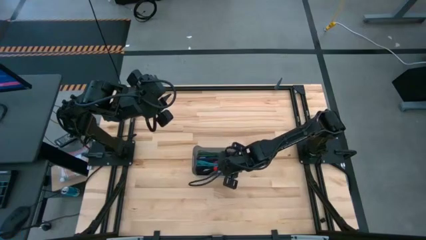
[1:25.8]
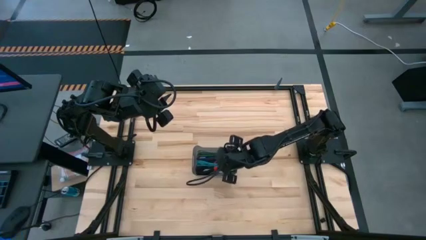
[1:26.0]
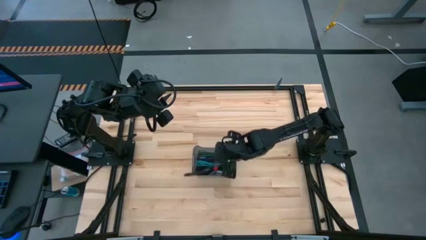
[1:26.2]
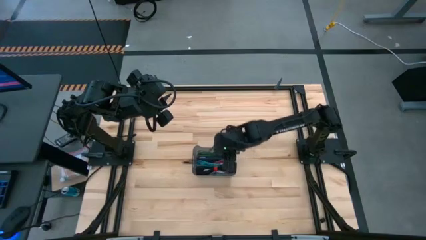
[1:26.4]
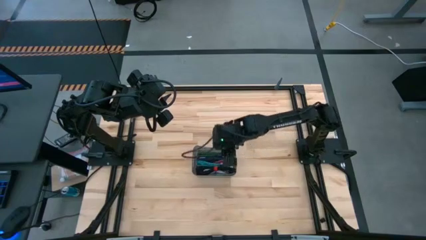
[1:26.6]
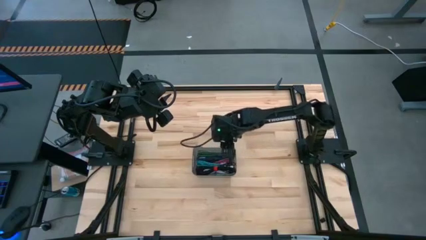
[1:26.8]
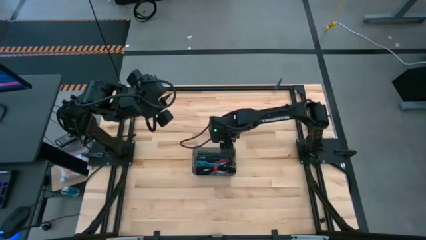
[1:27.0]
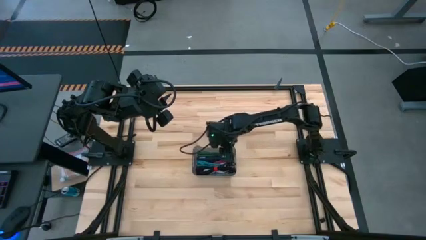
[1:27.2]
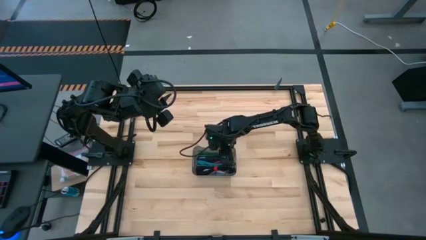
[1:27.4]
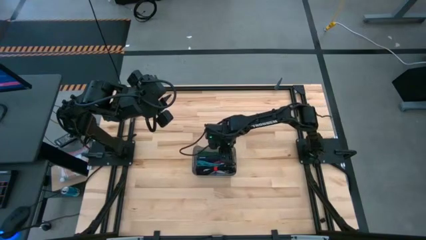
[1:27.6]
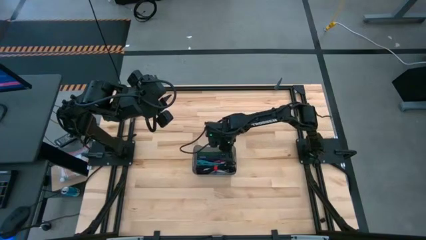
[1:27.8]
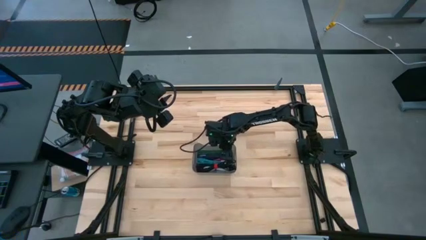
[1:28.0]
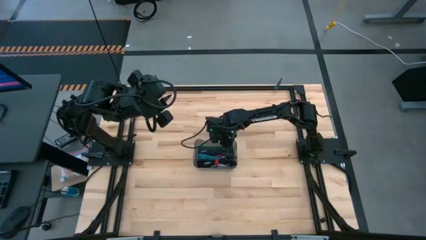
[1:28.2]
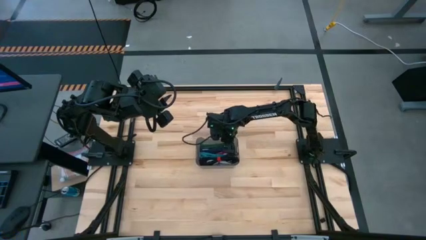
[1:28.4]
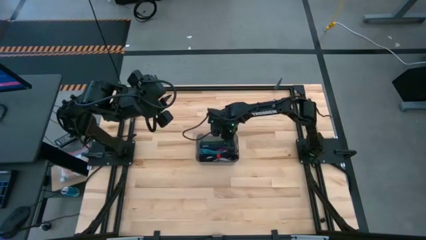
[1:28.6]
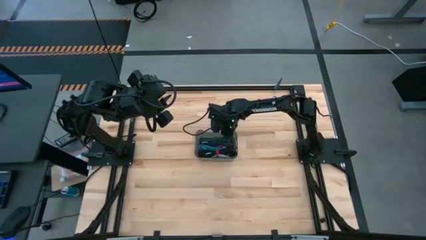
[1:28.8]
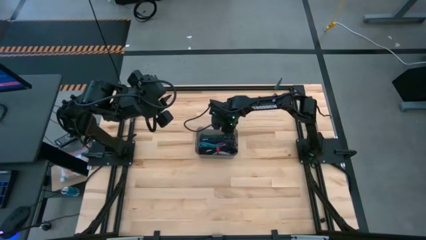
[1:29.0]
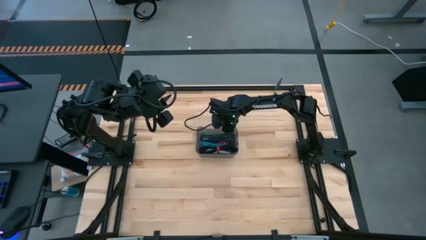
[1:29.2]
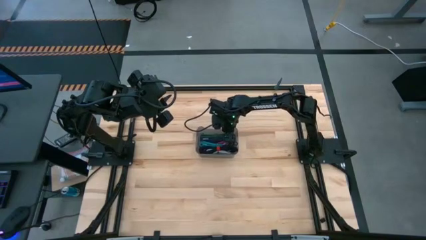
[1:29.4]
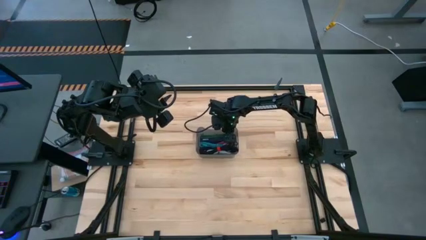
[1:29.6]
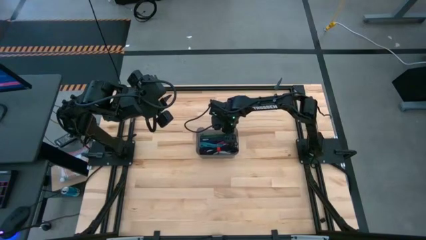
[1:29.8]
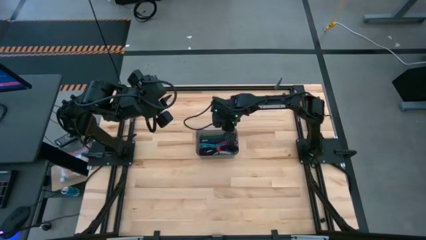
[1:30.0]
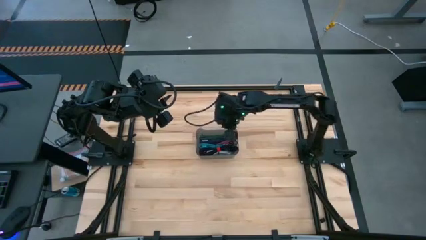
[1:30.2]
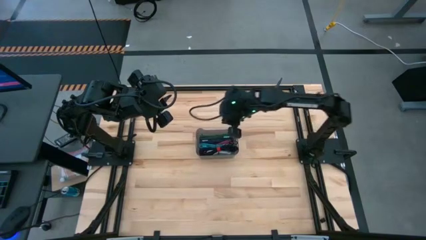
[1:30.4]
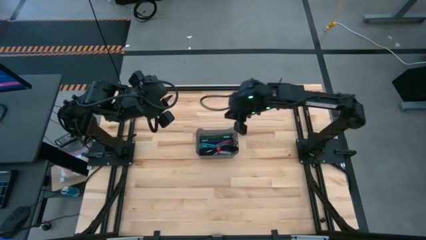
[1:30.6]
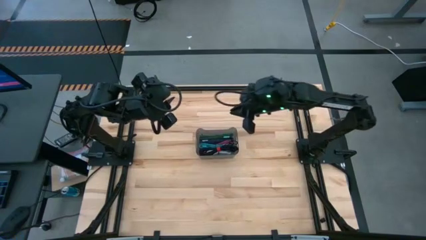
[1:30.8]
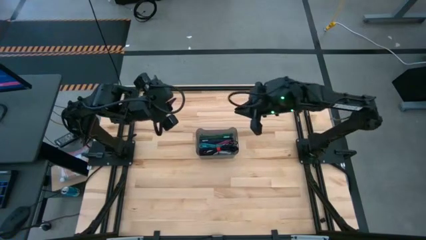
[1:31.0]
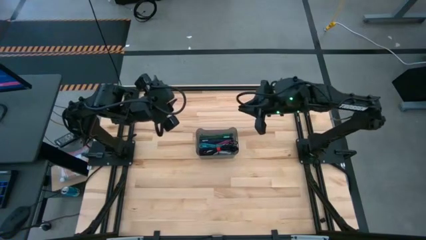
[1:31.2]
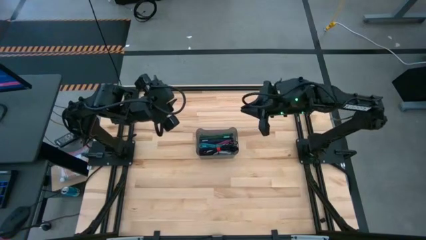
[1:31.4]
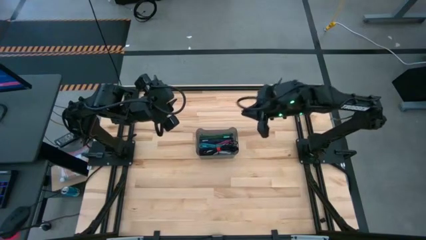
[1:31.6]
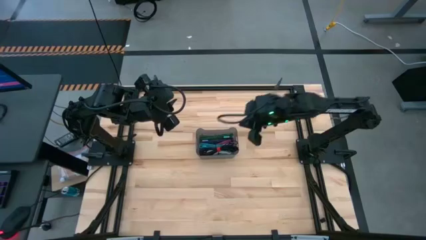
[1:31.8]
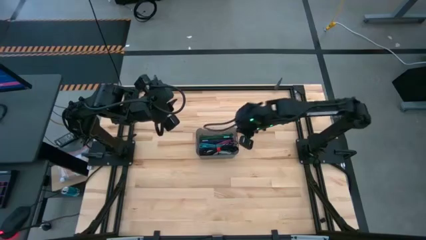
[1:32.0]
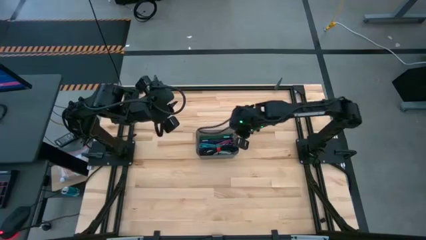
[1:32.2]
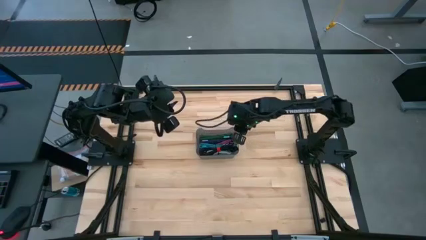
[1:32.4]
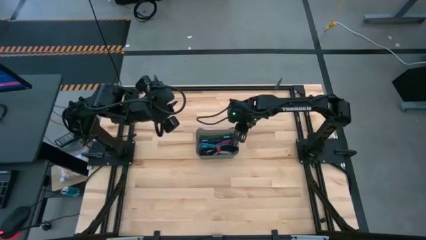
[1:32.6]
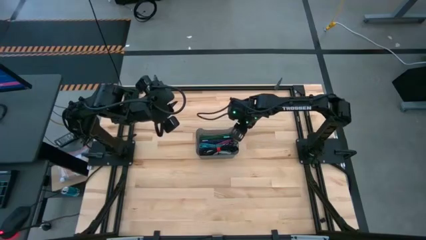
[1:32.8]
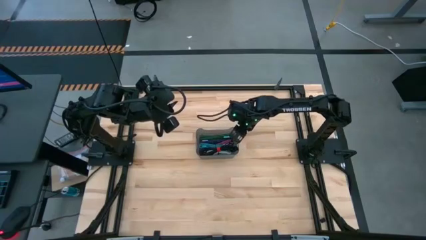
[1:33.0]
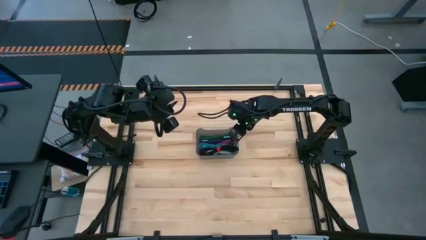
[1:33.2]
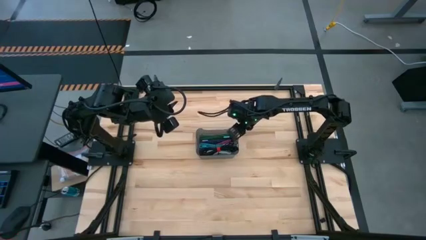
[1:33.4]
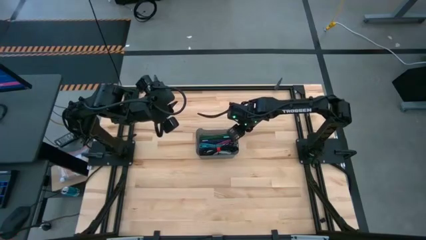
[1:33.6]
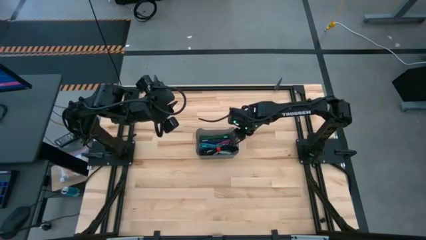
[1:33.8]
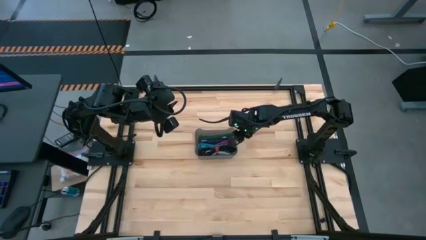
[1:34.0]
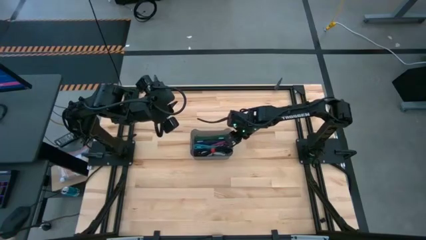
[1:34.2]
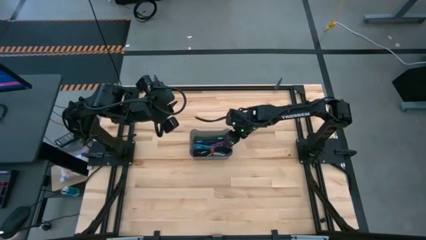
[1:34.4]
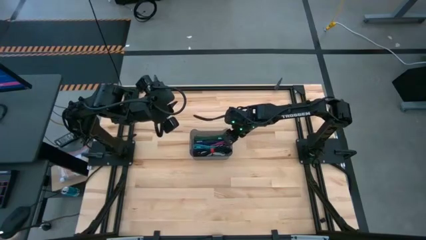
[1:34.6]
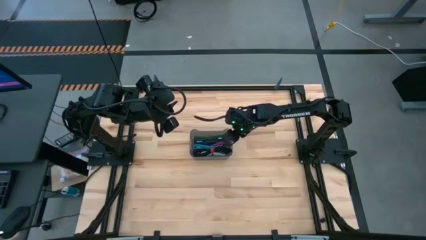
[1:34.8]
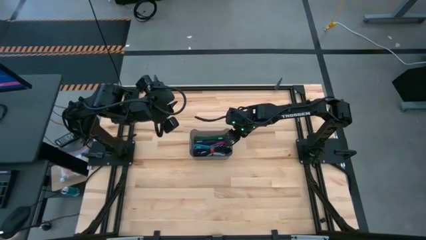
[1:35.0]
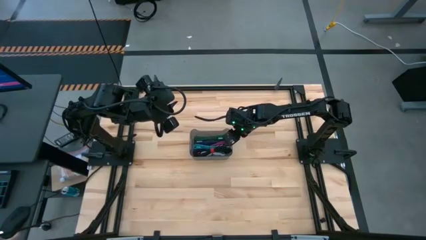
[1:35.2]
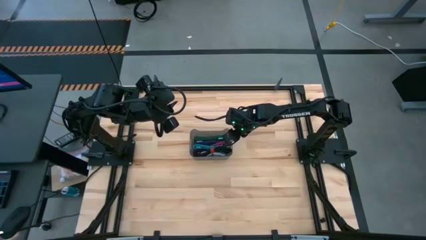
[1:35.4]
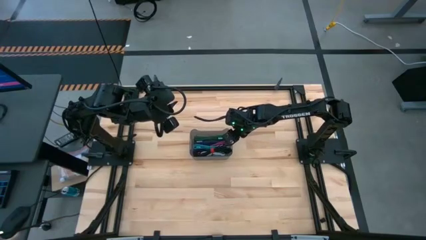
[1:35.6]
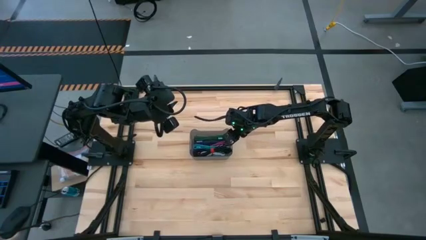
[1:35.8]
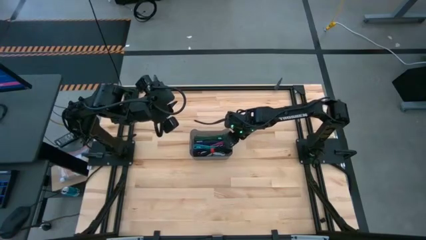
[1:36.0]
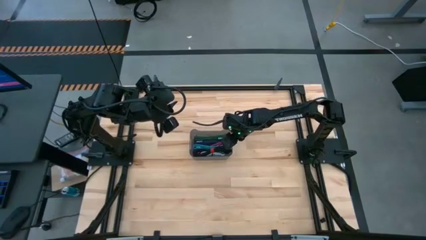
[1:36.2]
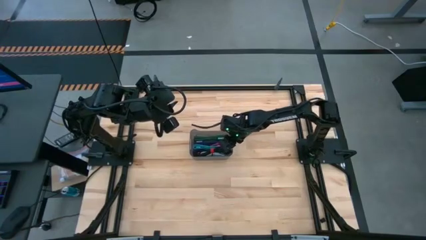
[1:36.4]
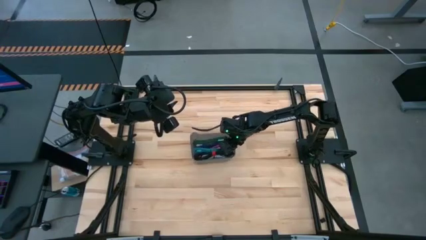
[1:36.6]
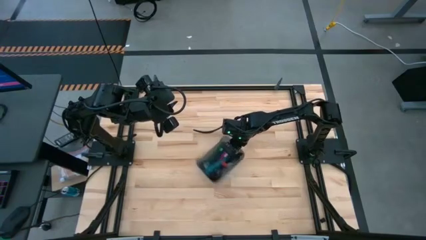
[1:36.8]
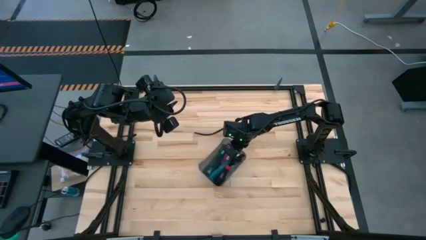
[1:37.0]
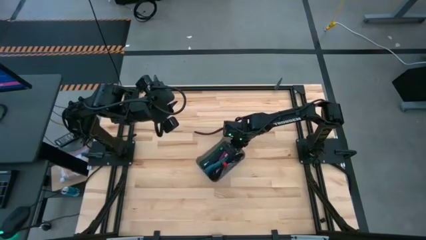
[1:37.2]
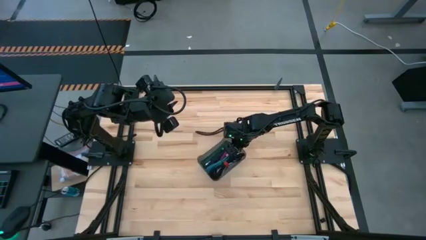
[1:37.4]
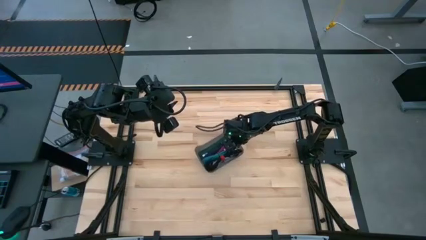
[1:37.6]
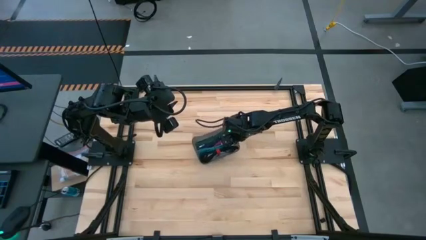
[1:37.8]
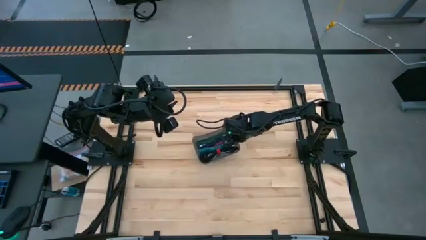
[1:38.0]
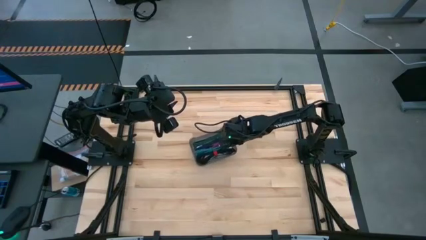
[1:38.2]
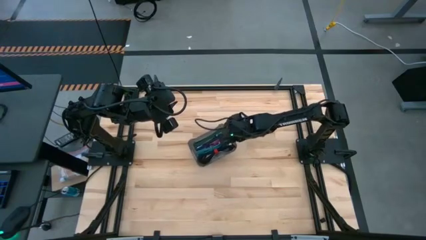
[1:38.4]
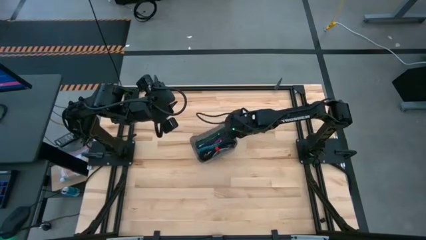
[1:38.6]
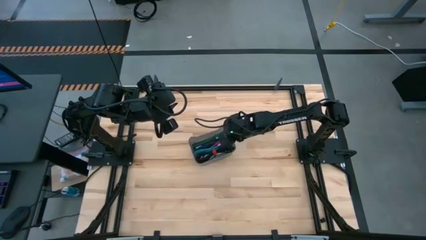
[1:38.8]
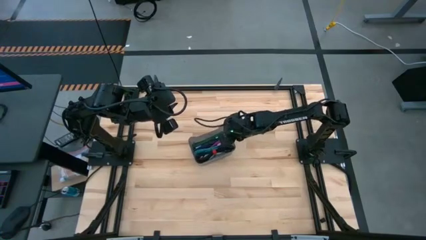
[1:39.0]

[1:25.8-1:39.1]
Task: Pick and place USB-C Cables
Adjust the black bin

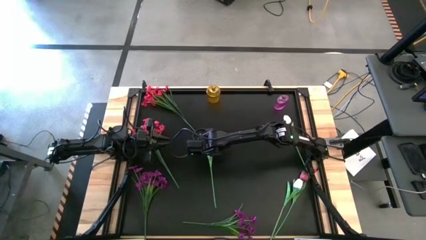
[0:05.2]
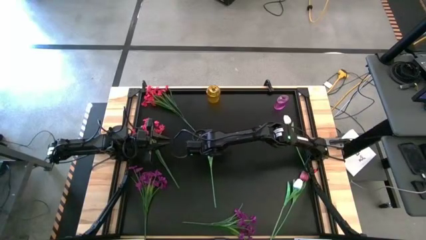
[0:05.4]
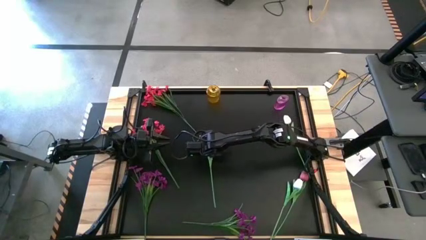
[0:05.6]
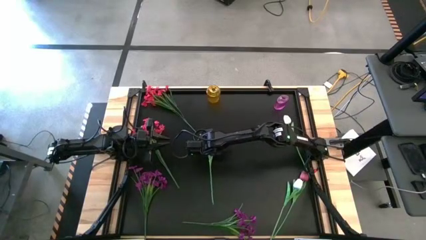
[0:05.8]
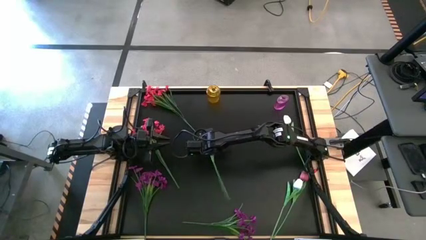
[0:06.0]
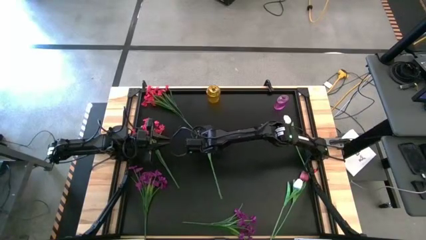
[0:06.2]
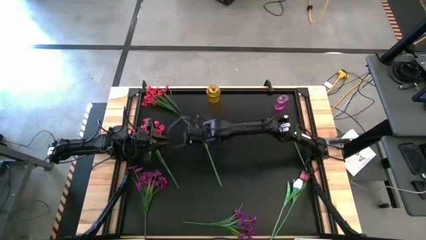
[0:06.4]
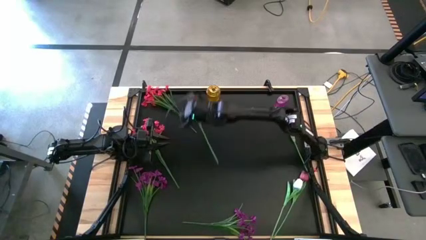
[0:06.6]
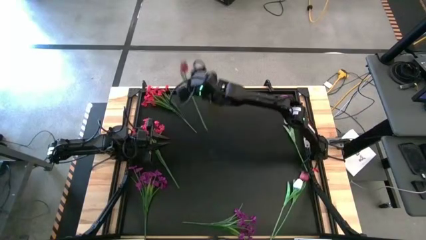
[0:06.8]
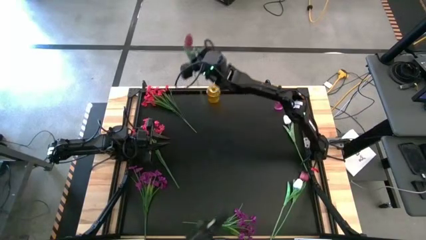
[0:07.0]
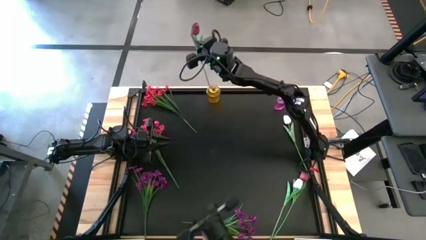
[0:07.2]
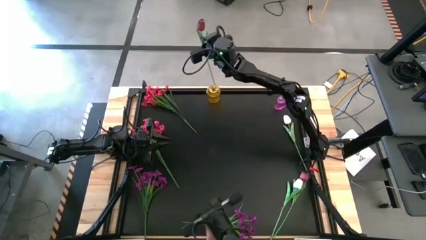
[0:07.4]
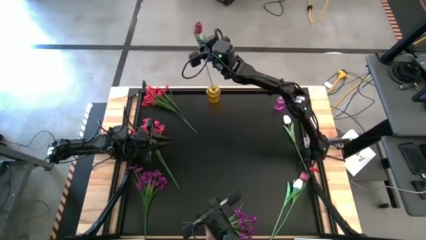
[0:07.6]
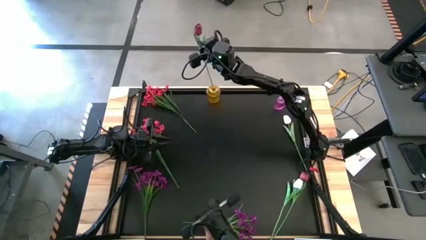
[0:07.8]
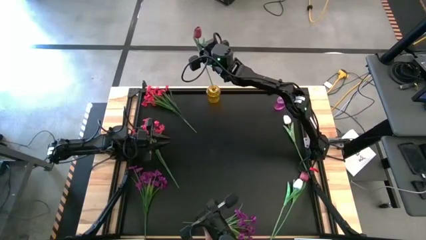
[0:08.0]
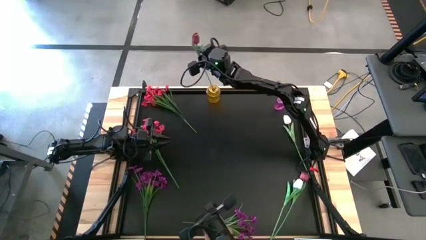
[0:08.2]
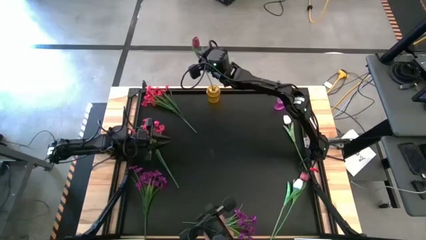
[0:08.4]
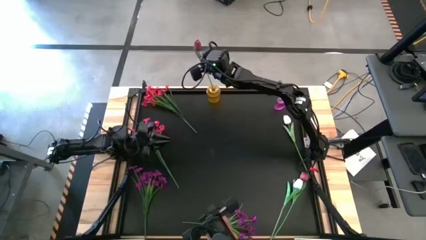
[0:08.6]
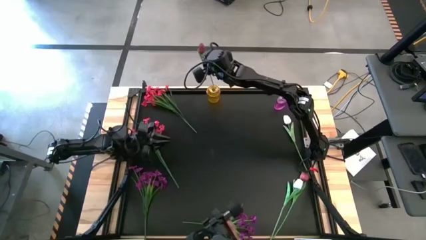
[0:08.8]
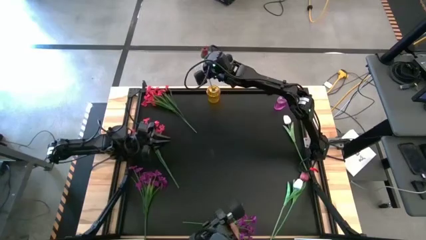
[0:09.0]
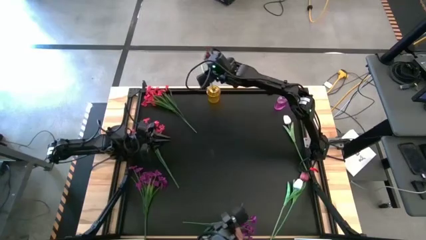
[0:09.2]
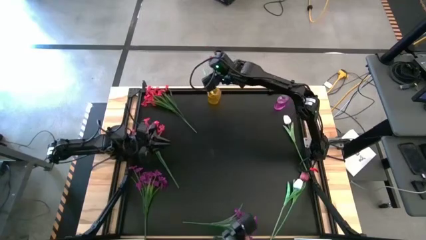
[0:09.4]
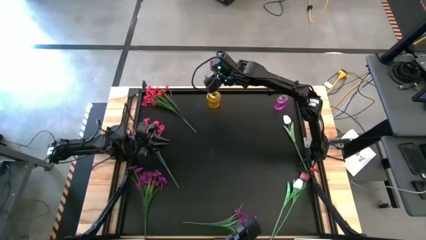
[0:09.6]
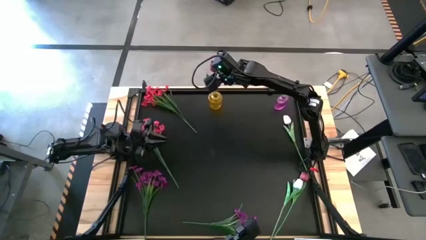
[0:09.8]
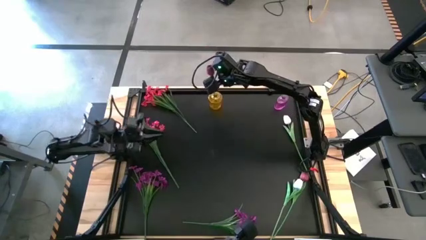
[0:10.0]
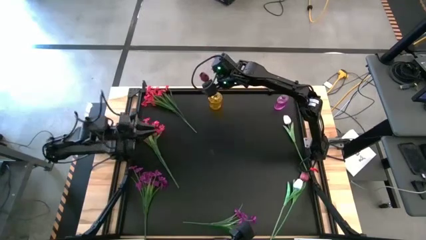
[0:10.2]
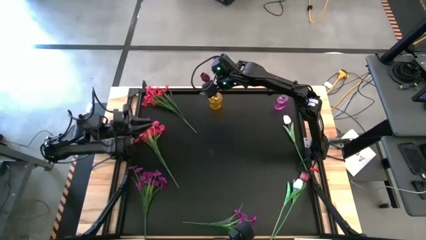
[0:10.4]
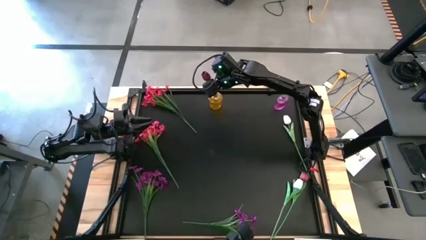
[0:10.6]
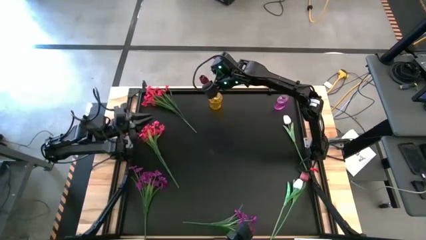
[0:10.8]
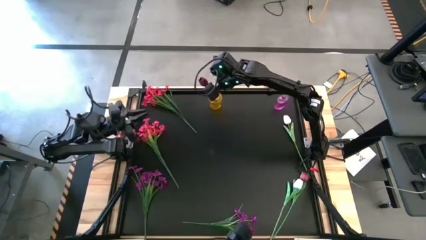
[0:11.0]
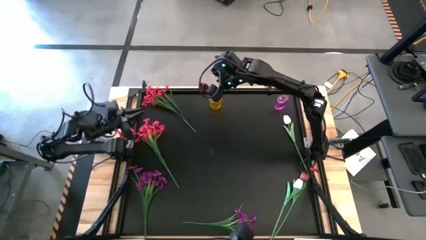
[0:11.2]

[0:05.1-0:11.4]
Task: Sort flowers into vase by color
Put the left pink tulip into the yellow flower vase
